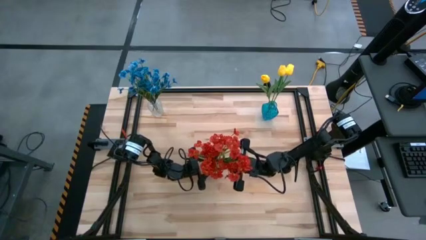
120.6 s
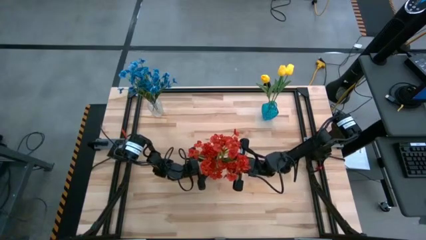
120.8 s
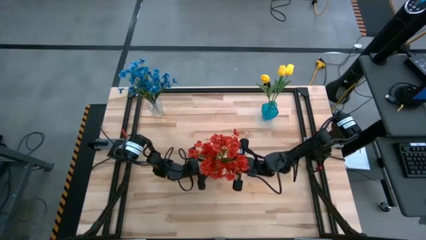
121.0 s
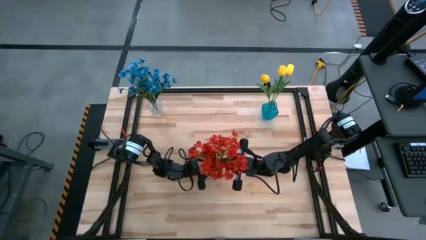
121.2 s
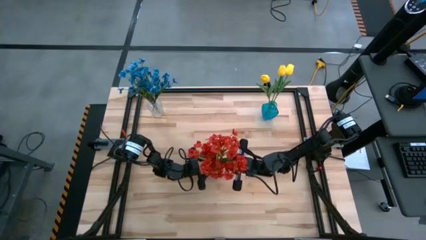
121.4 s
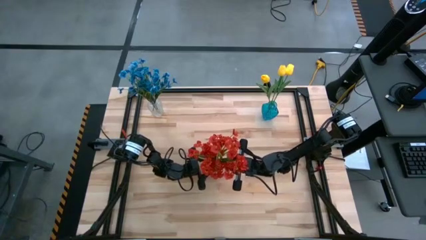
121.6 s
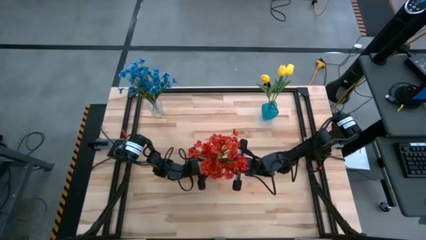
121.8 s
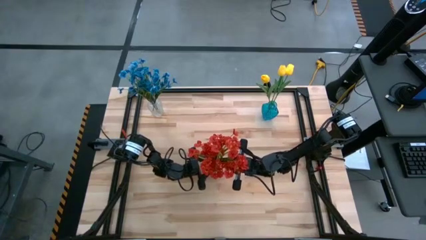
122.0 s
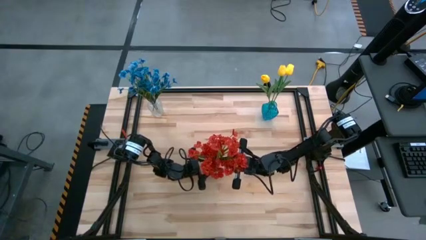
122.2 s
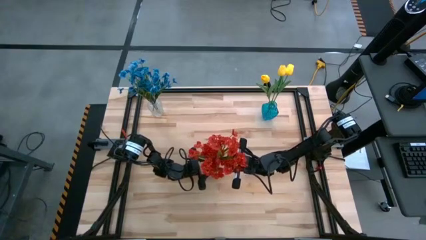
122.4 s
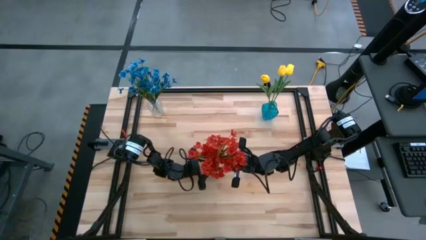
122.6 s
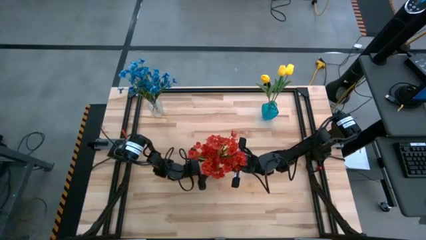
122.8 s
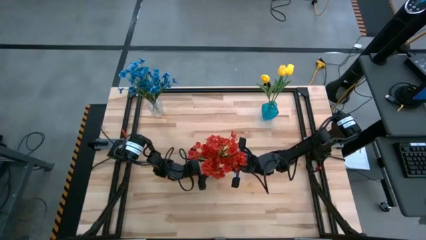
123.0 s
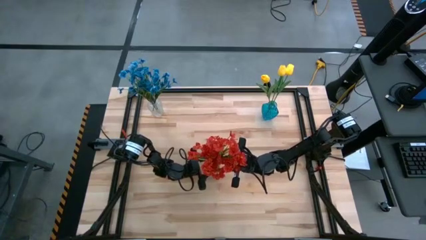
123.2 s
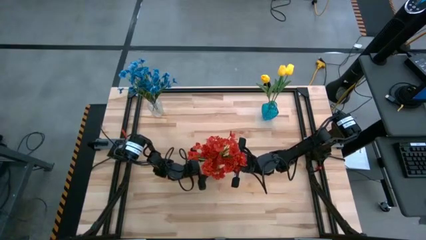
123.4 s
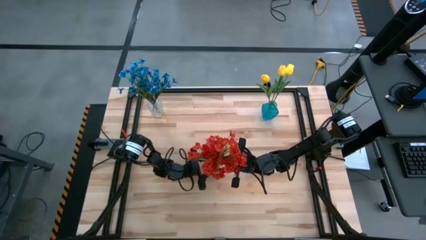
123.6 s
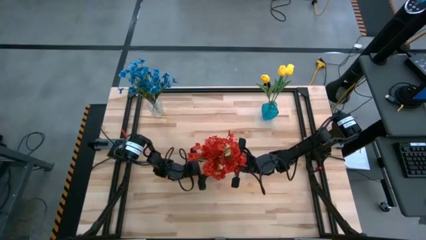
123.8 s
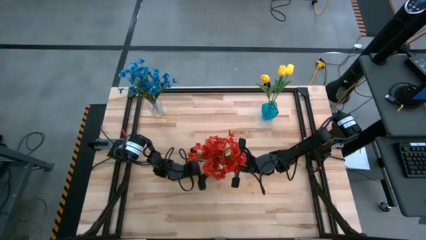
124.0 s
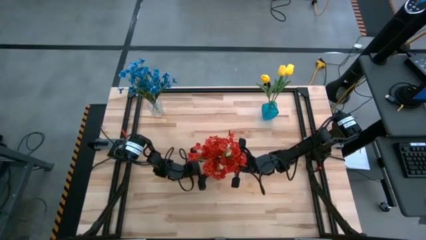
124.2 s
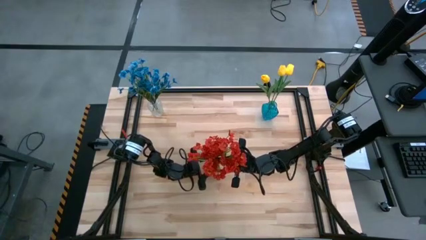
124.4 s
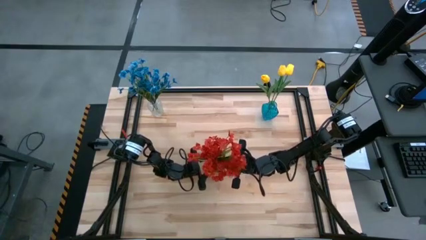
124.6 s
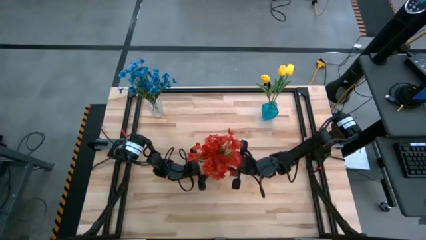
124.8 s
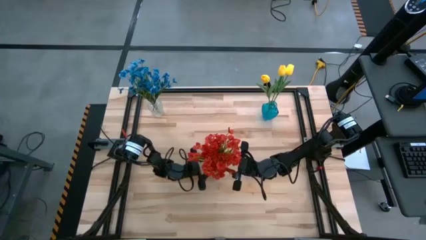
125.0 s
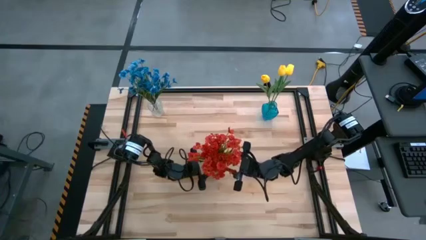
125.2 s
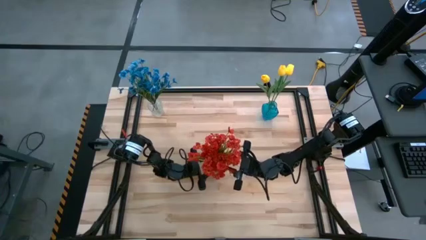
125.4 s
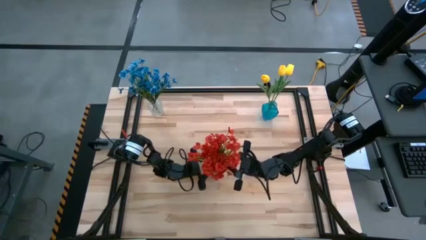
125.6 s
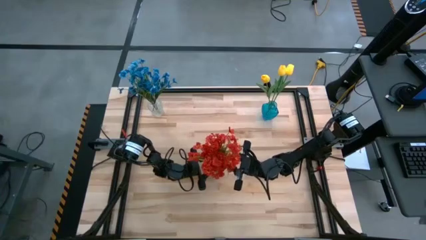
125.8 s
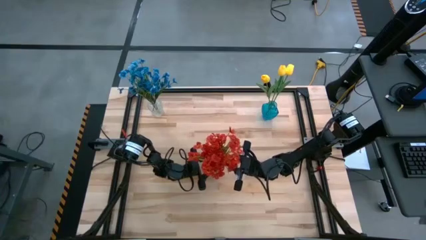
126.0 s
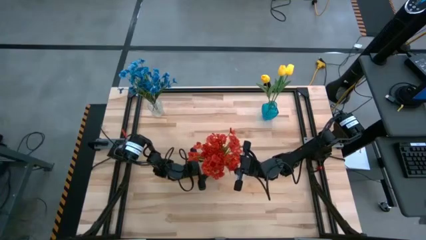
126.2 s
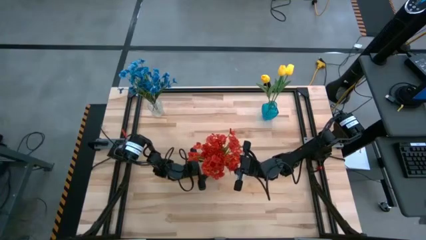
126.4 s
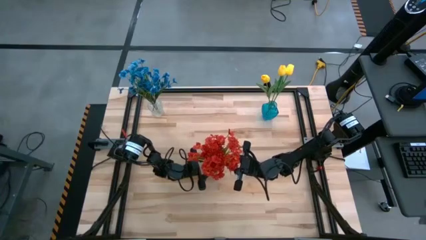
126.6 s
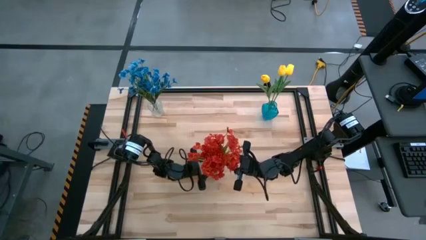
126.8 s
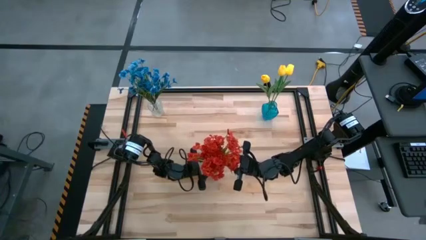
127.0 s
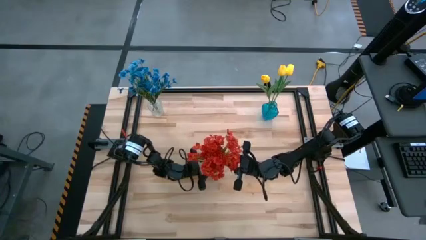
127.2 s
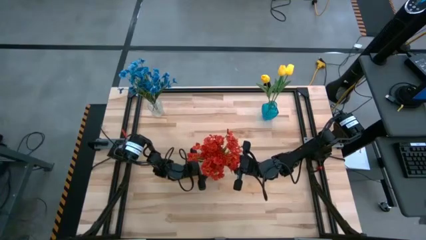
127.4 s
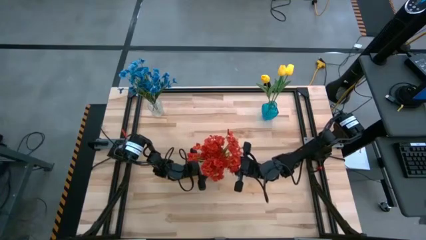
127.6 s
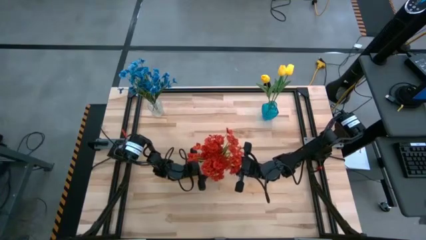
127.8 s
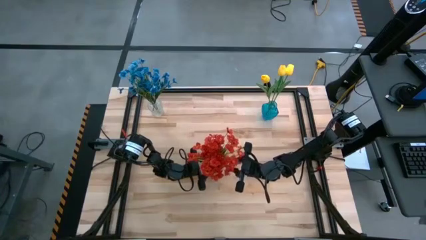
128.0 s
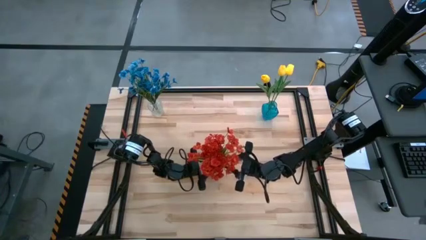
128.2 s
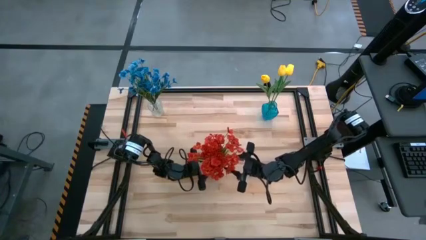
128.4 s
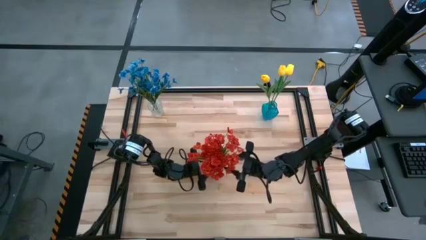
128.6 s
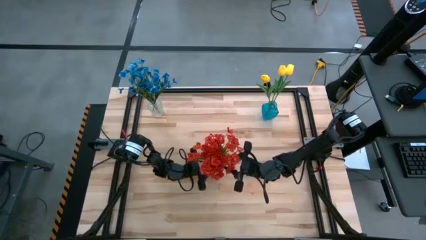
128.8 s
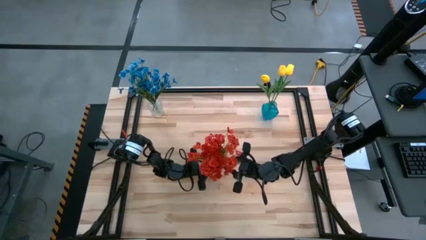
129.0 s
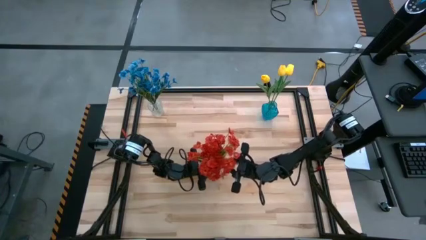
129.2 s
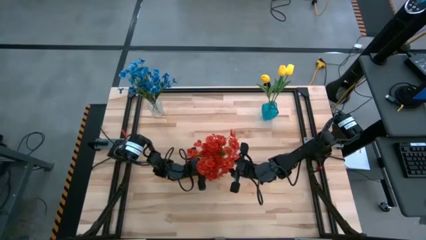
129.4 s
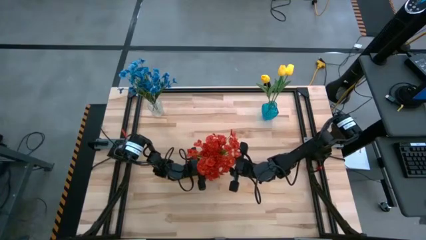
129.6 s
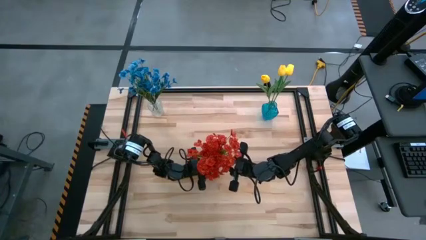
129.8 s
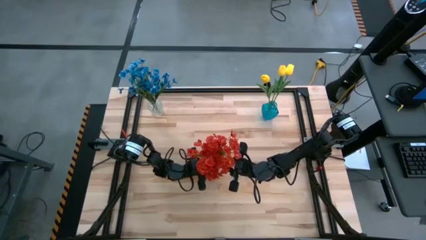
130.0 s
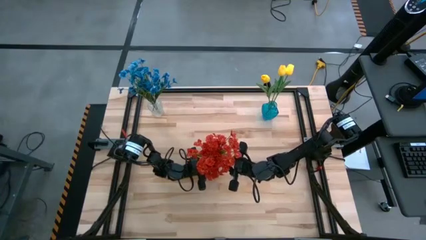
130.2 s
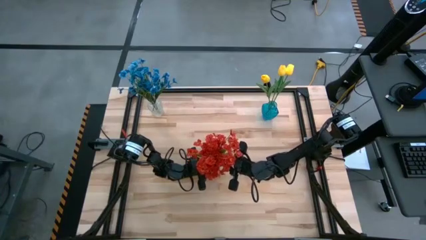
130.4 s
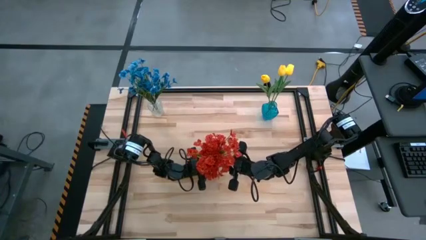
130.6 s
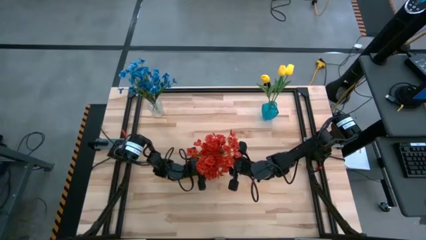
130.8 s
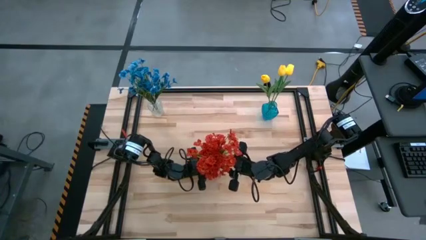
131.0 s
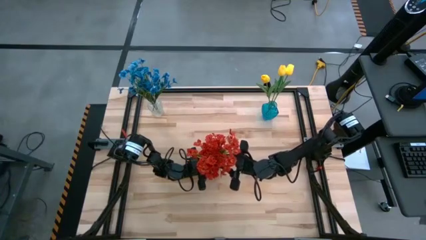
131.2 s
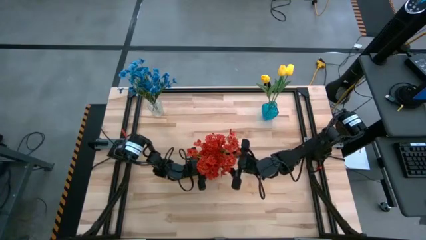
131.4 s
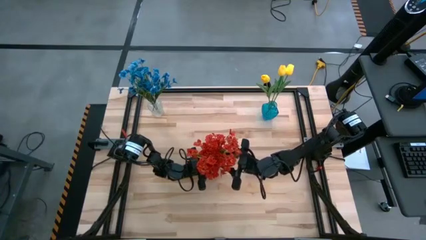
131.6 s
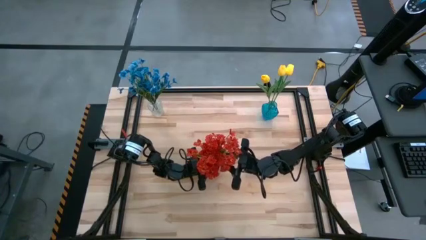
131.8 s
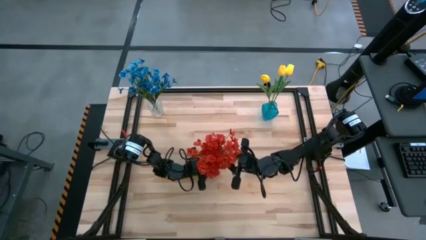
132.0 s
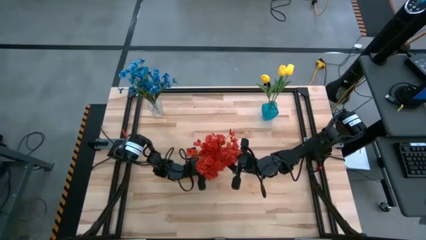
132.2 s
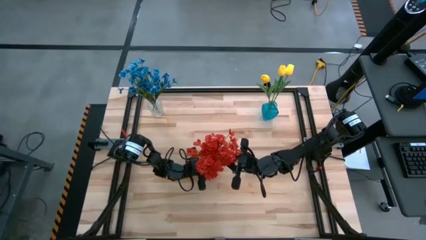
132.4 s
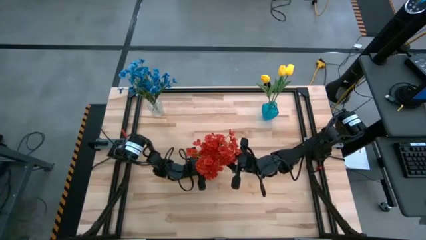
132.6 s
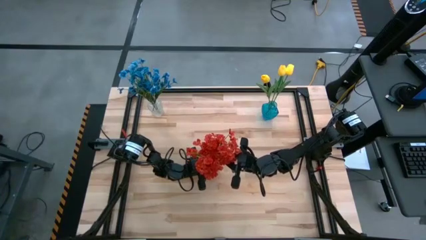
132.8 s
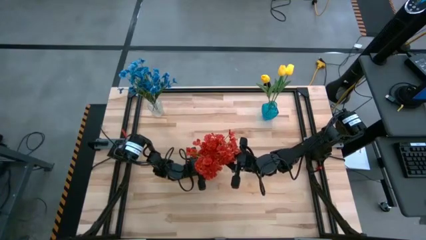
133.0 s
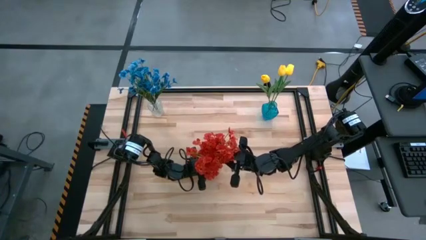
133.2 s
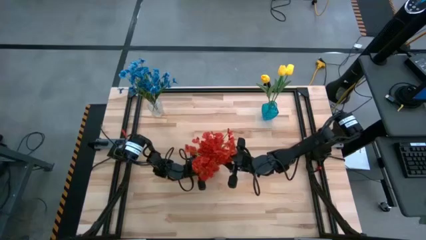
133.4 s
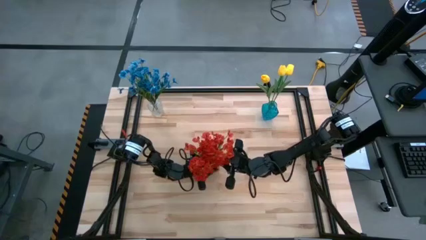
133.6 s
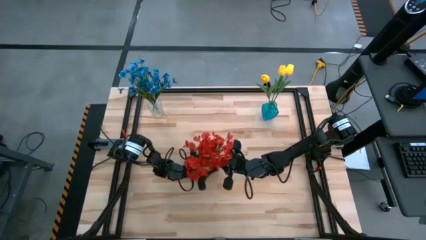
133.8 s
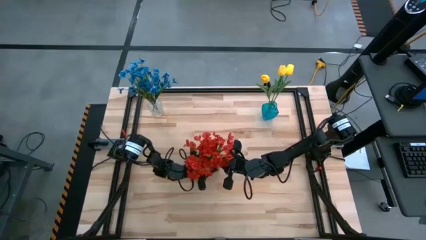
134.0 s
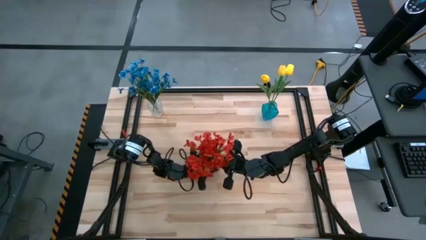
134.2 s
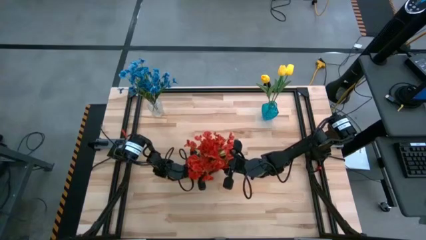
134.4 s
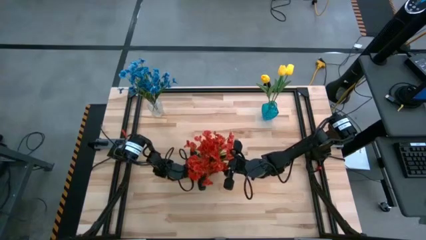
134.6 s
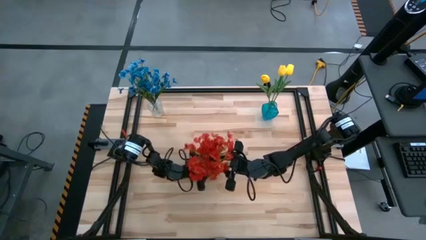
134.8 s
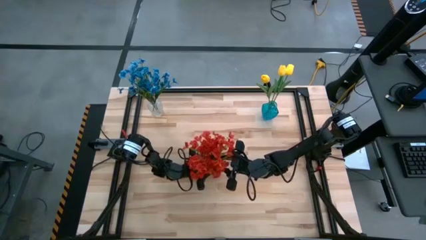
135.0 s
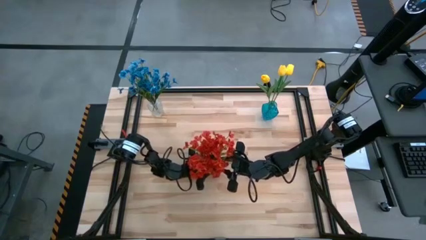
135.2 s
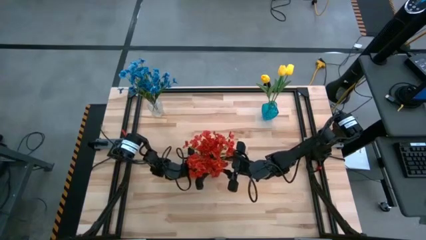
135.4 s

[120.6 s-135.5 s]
Task: Sort flowers into vase by color
Put the red flowers into the red vase
